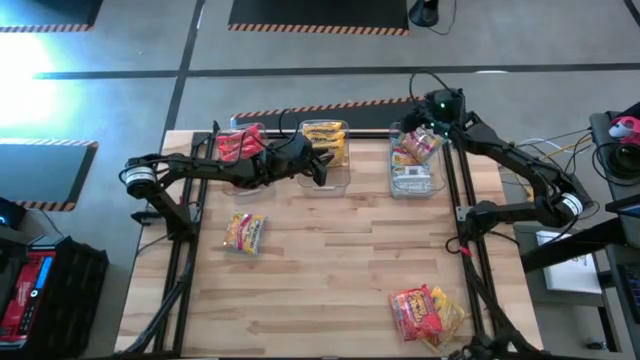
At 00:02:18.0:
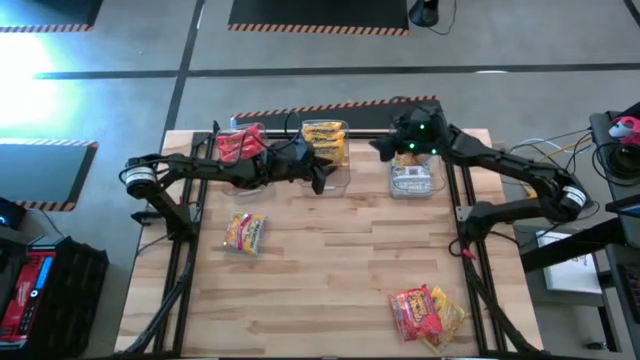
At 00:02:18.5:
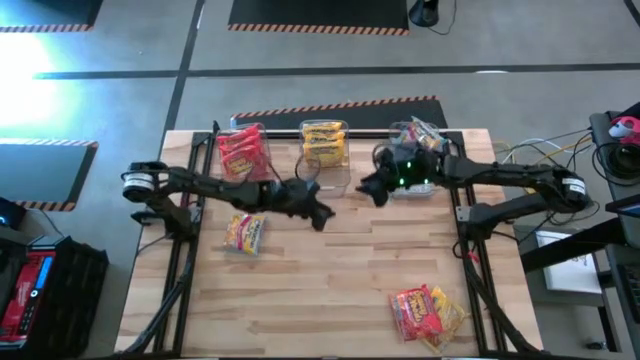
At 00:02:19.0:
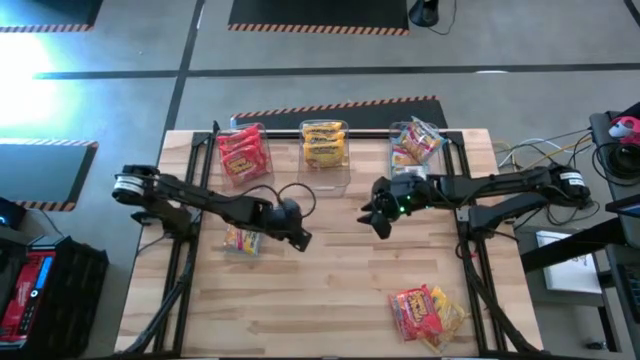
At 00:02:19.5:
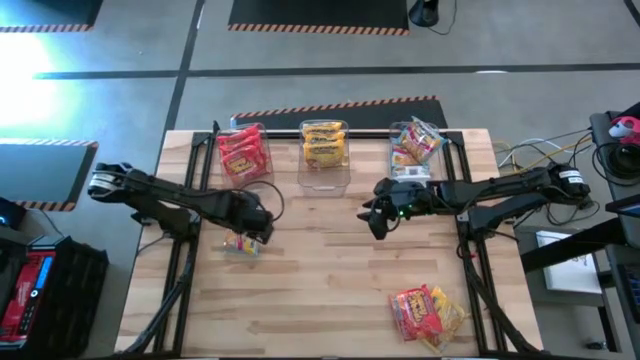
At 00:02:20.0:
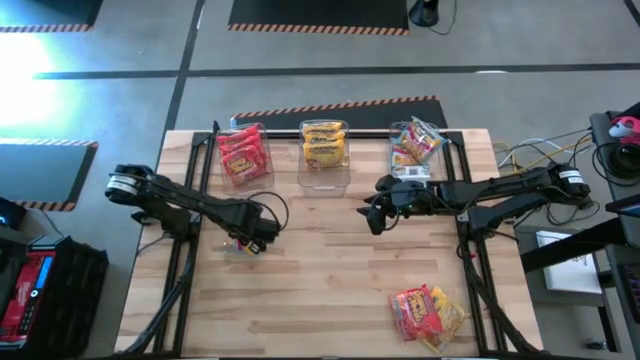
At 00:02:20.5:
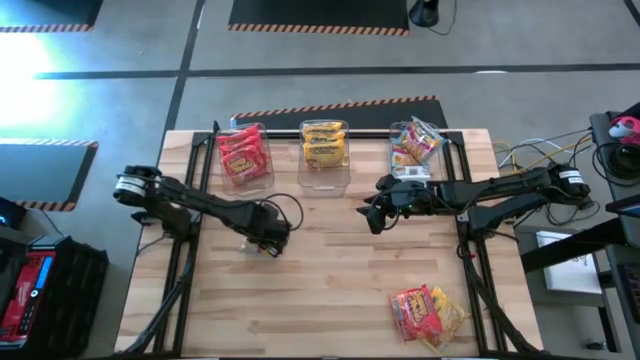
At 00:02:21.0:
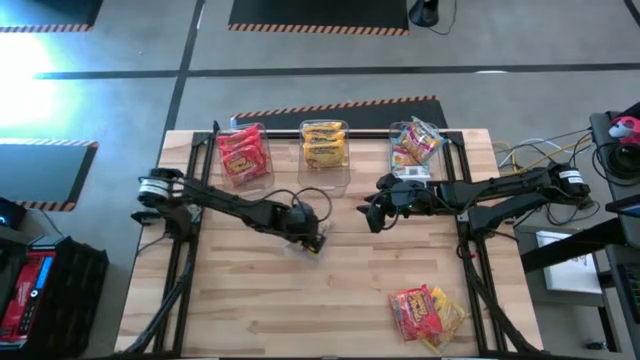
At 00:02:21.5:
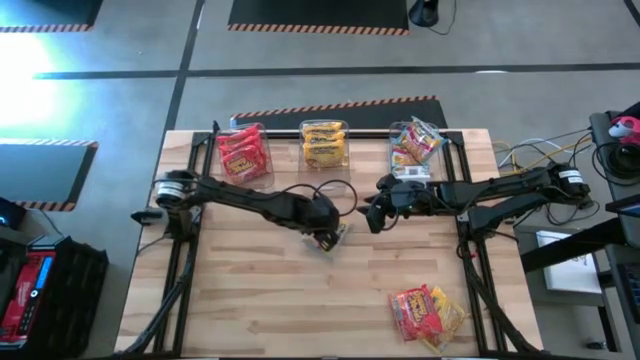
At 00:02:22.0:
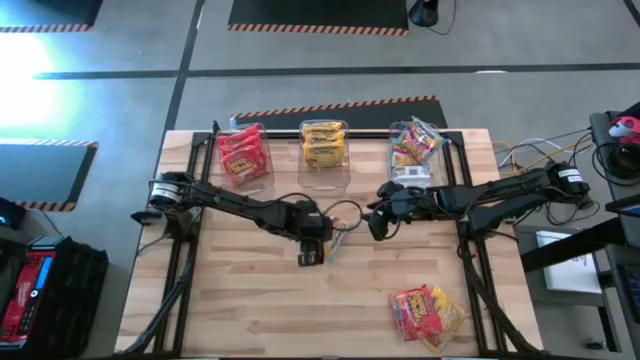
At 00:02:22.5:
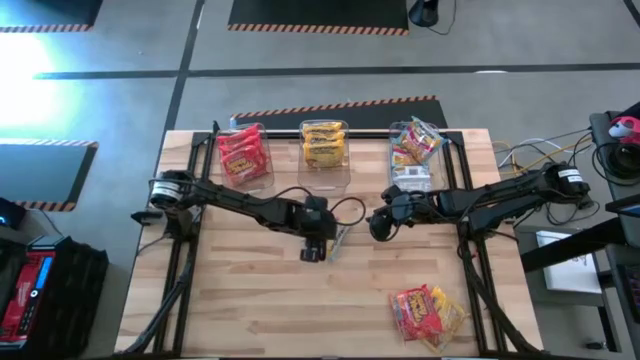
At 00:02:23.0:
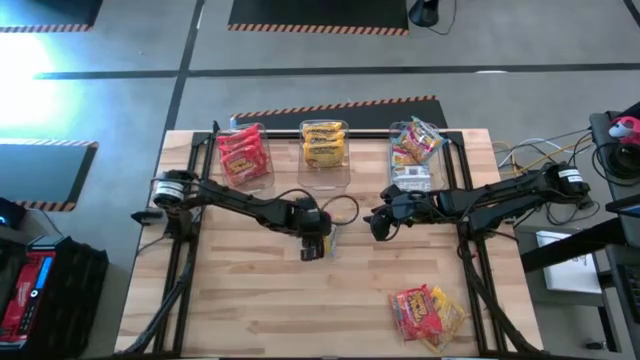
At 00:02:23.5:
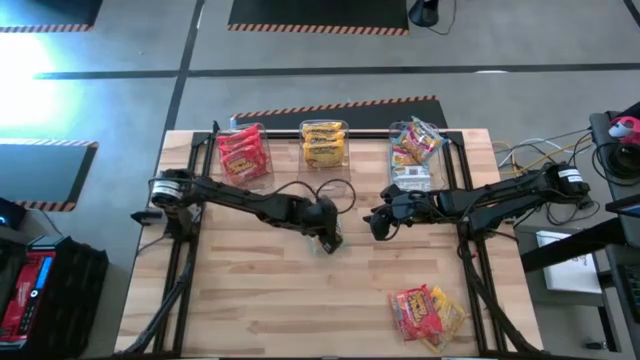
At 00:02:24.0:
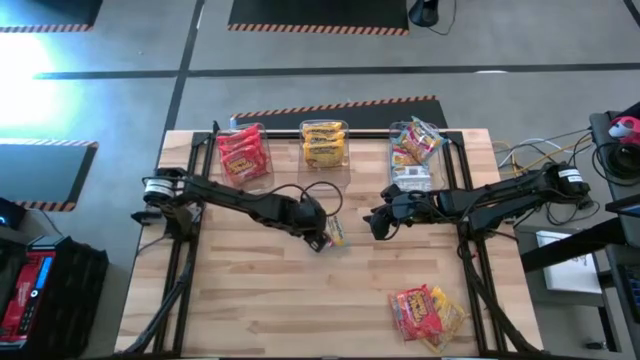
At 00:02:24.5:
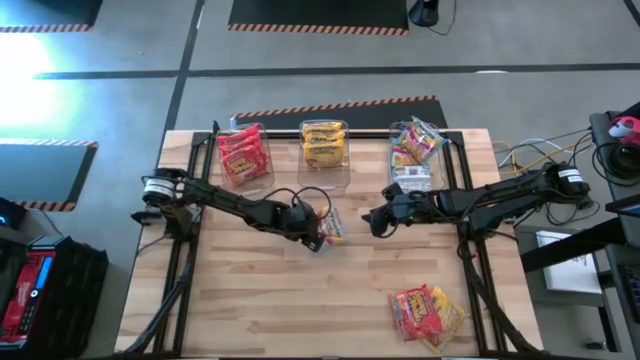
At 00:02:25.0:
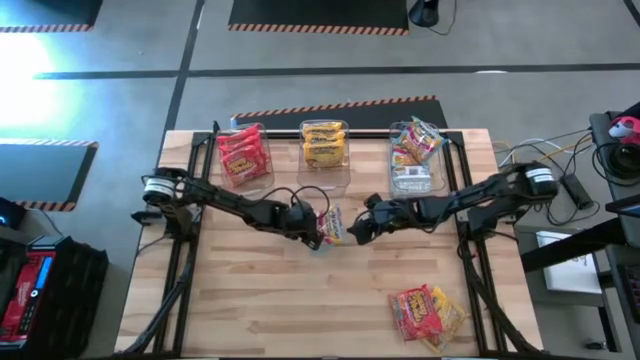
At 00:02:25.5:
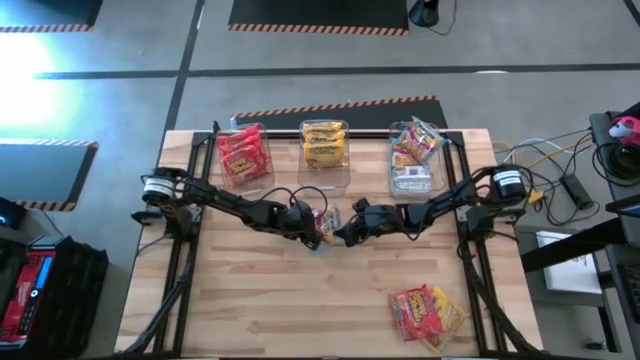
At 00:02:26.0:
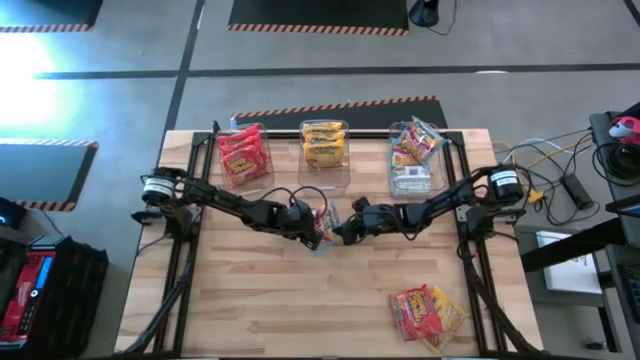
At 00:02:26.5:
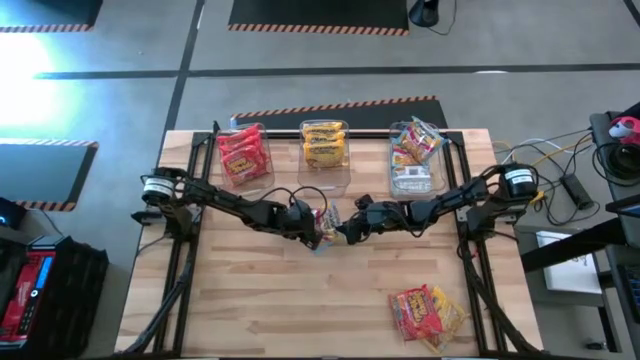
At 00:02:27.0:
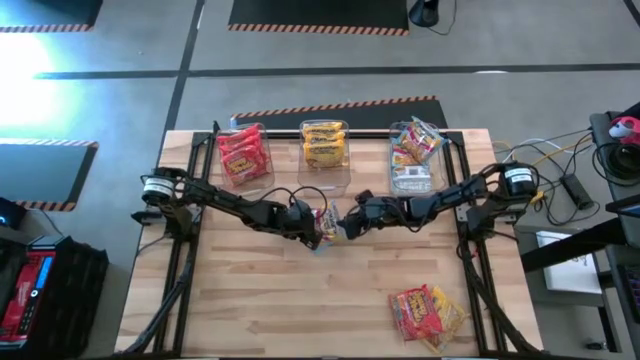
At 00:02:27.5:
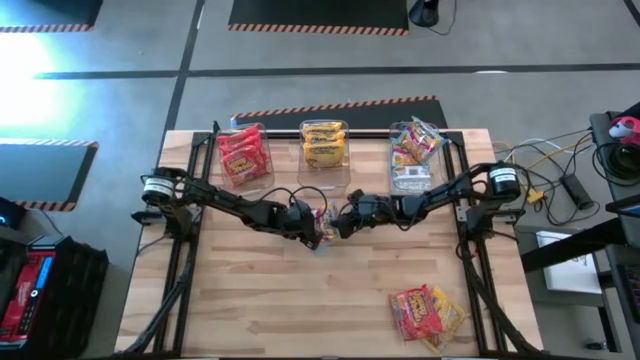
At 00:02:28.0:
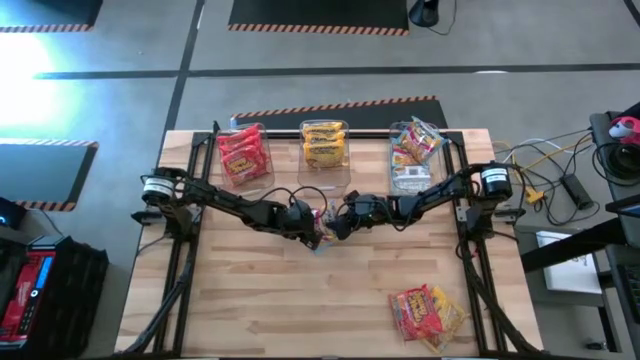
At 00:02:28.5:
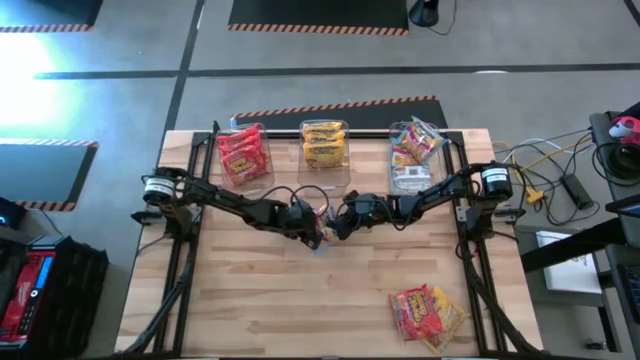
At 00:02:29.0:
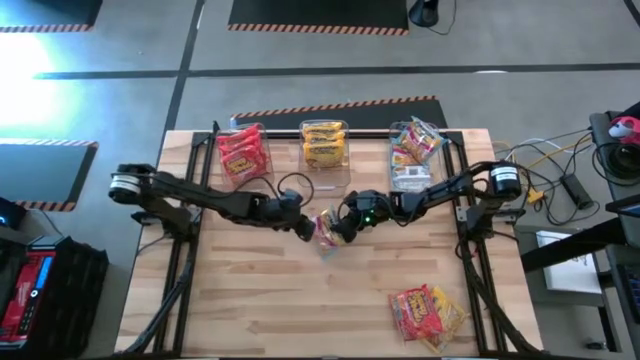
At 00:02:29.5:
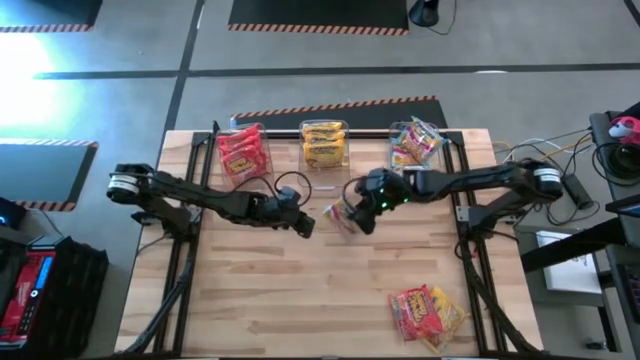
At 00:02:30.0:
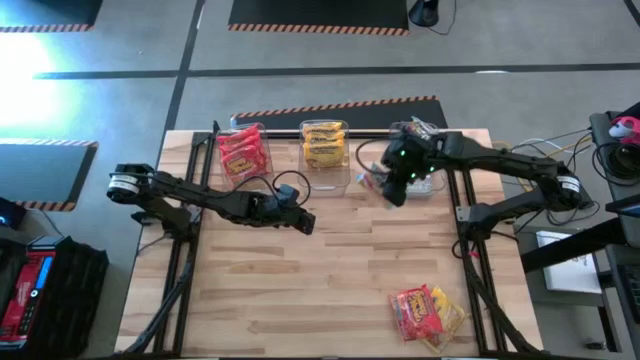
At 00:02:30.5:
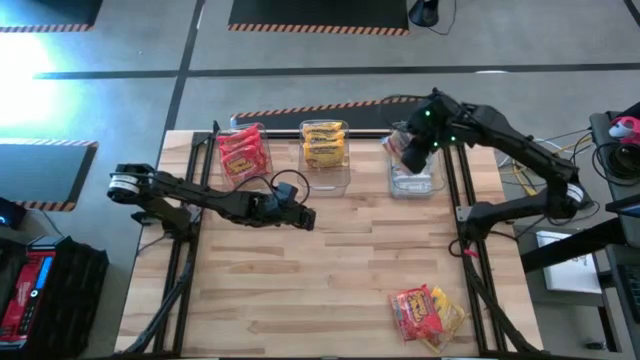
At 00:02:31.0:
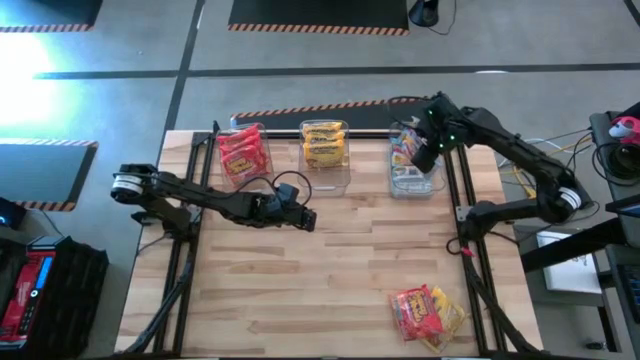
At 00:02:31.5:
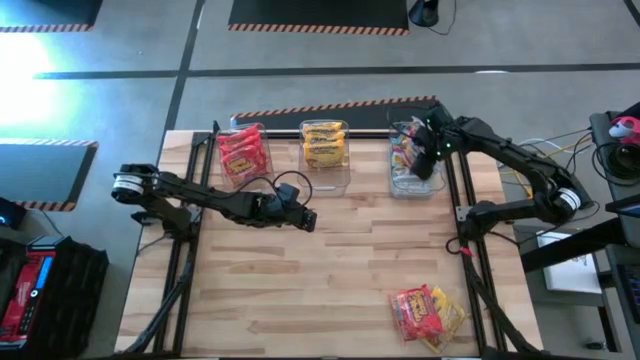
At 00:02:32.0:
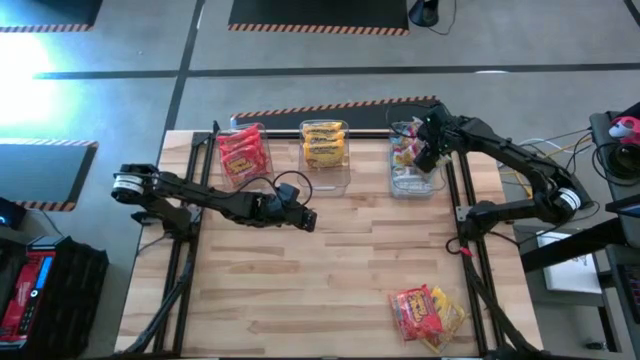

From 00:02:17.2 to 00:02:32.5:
Task: Sort Maruchan noodles
Put the blue noodle pack into the right transparent bin

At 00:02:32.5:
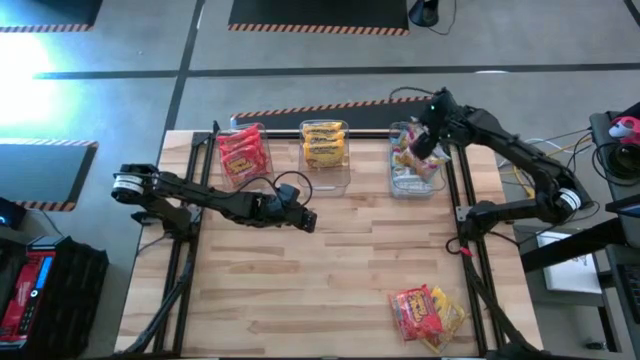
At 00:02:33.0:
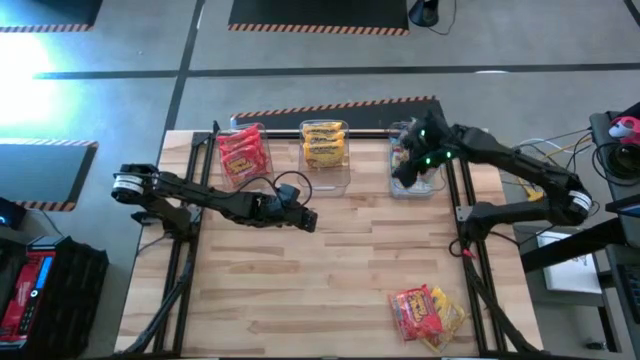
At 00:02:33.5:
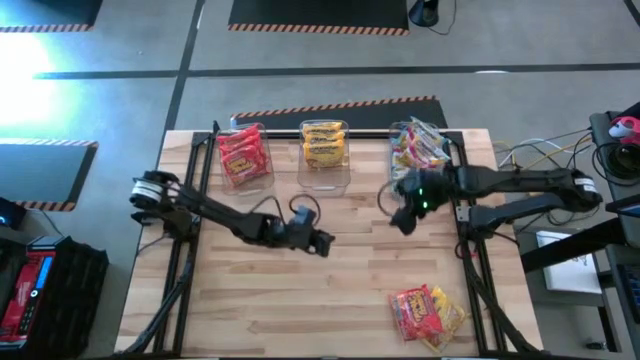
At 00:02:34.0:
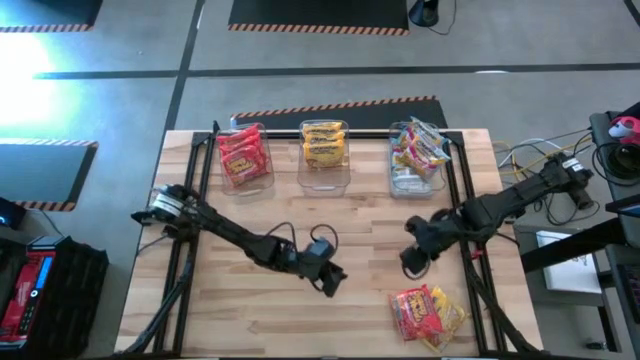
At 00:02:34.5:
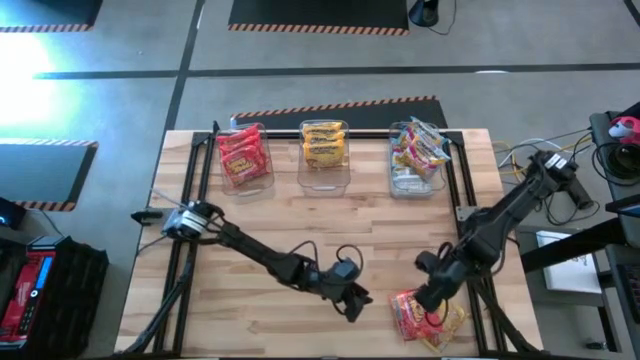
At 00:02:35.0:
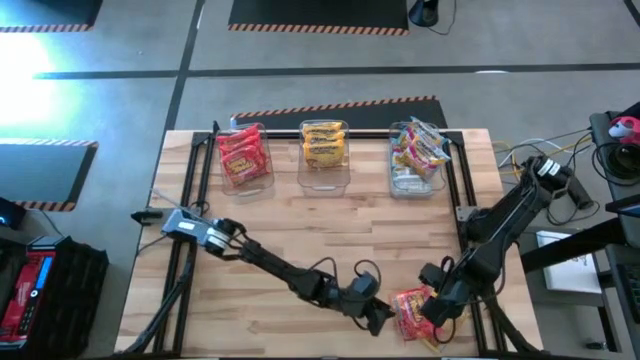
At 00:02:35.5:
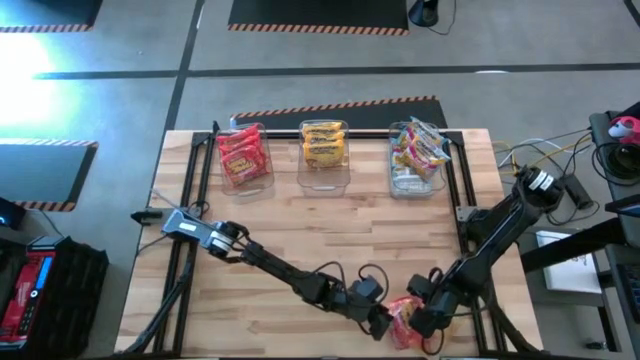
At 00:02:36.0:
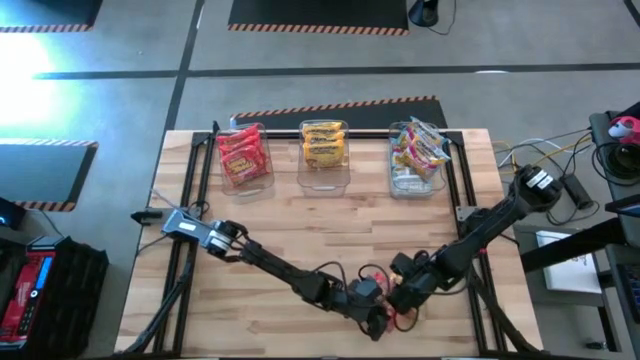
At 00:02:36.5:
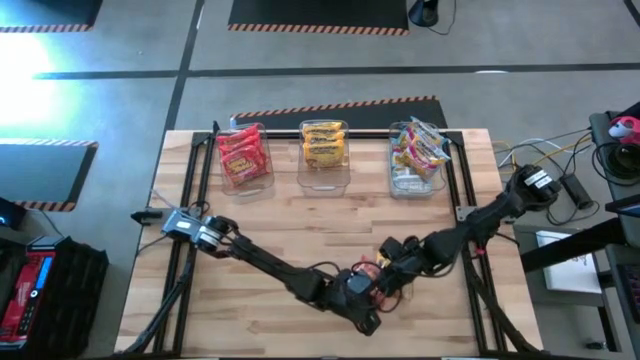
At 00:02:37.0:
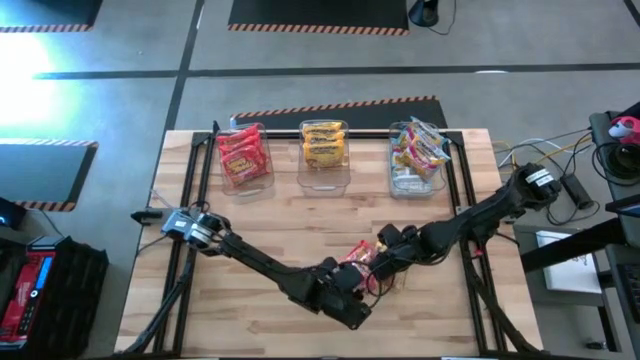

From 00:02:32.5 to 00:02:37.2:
Move the noodle packs to the middle right of the table
